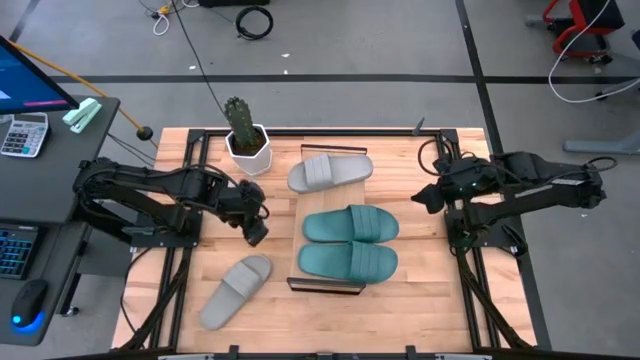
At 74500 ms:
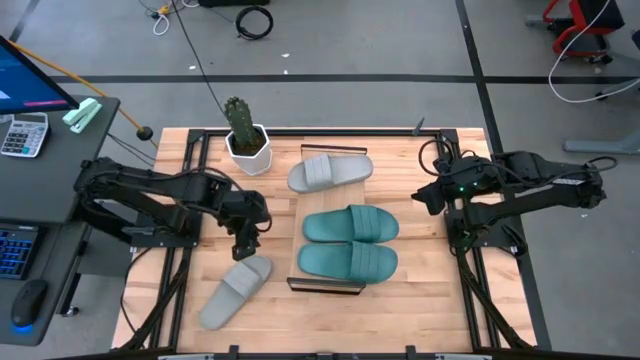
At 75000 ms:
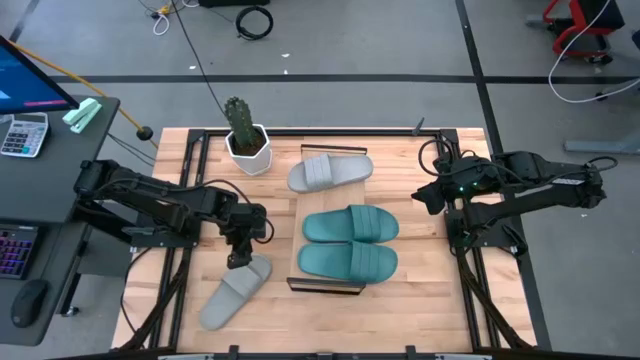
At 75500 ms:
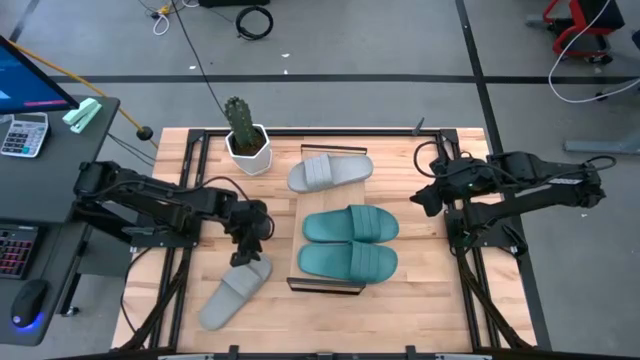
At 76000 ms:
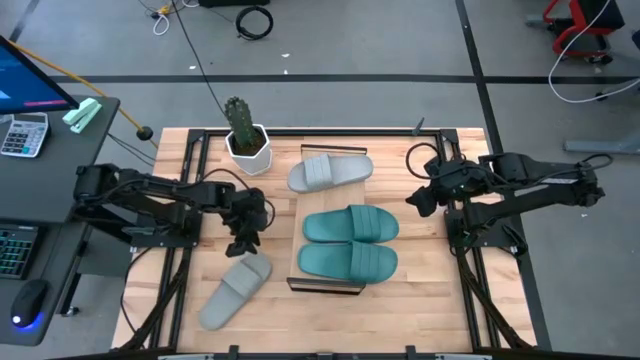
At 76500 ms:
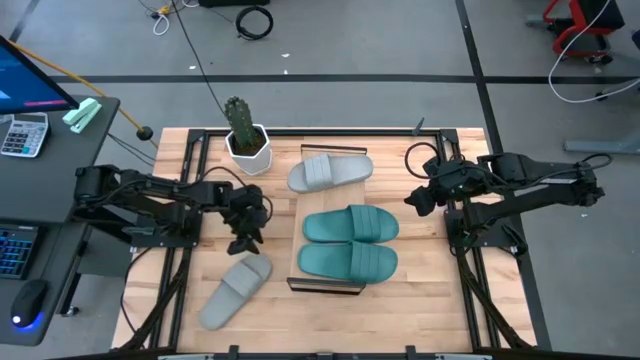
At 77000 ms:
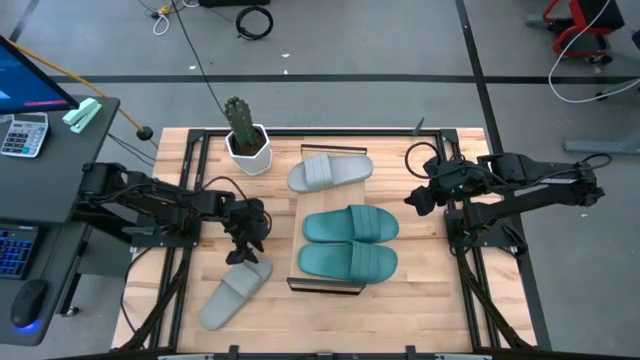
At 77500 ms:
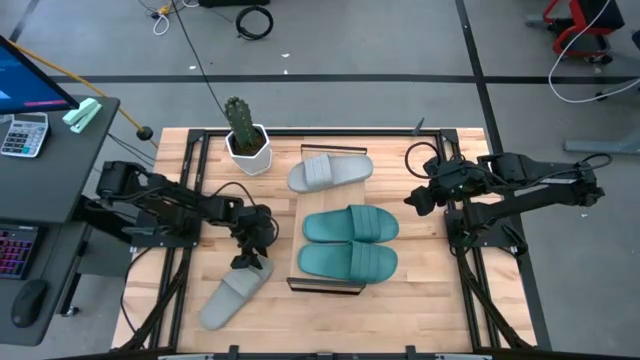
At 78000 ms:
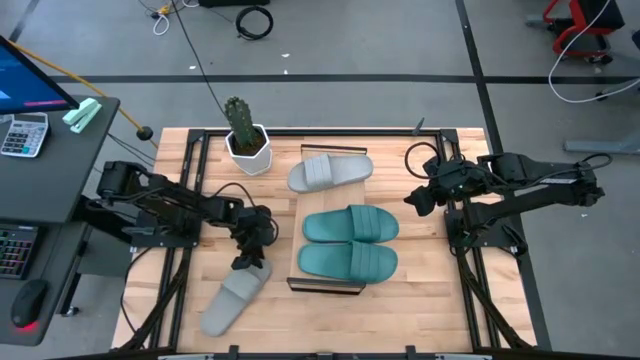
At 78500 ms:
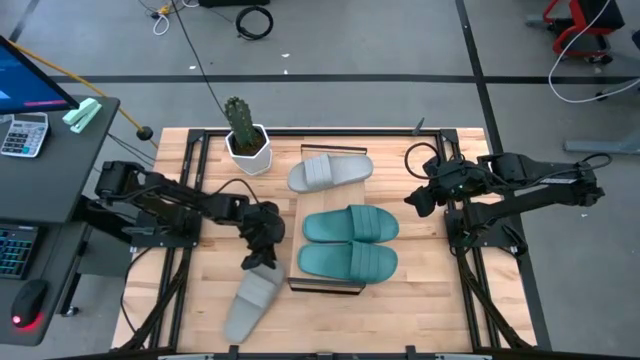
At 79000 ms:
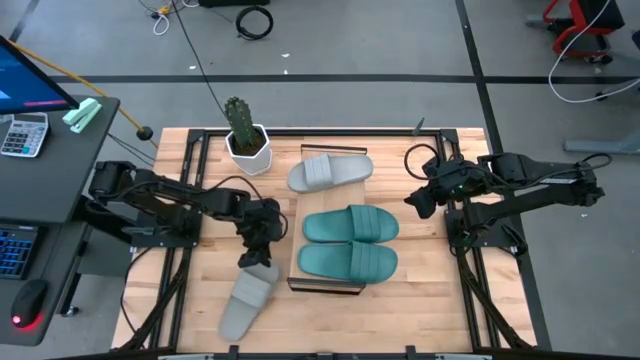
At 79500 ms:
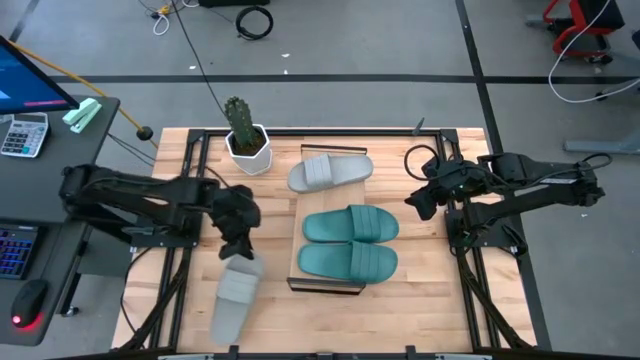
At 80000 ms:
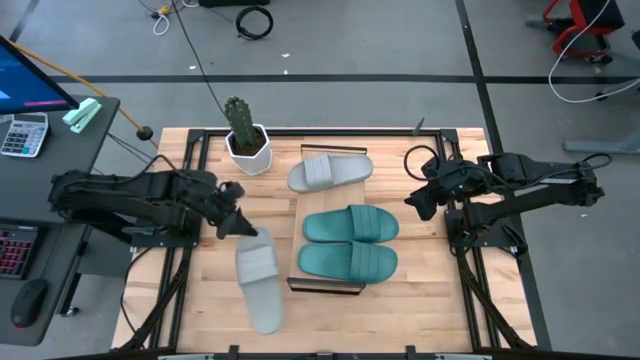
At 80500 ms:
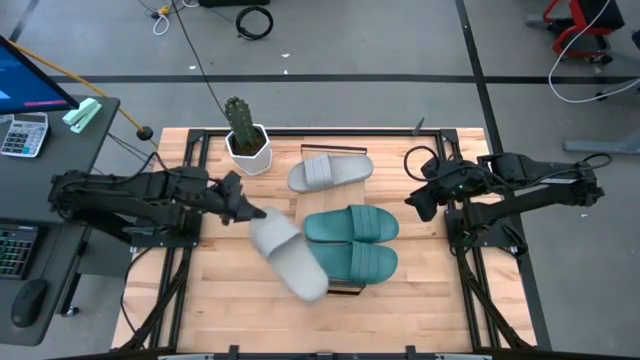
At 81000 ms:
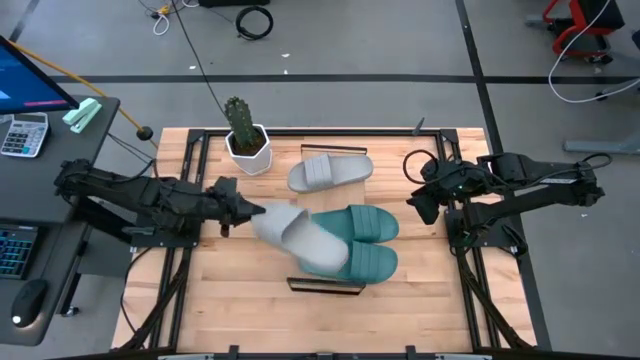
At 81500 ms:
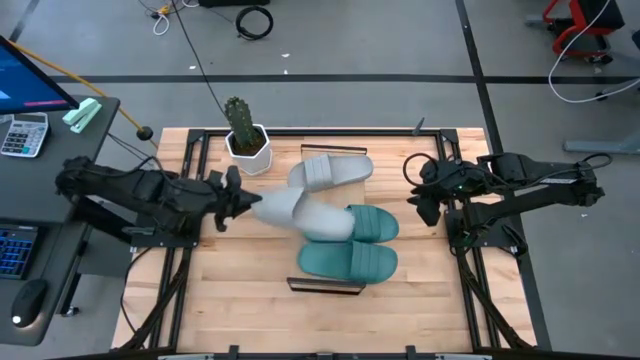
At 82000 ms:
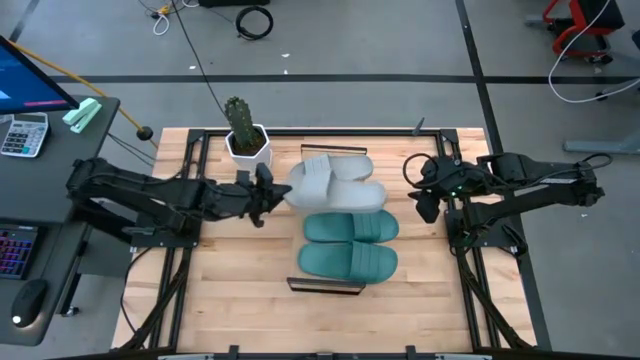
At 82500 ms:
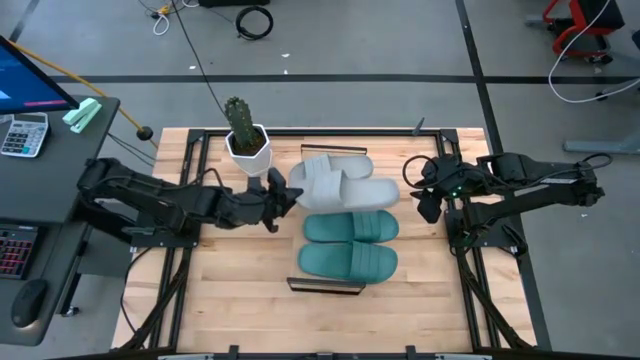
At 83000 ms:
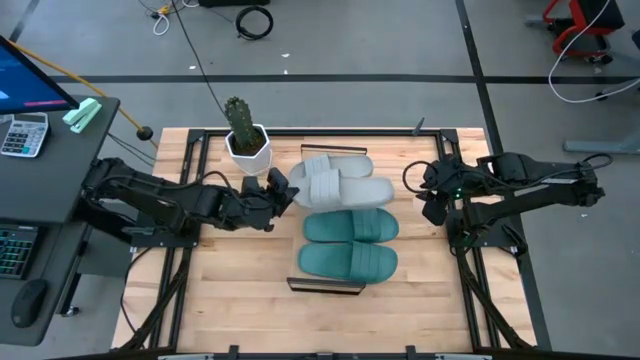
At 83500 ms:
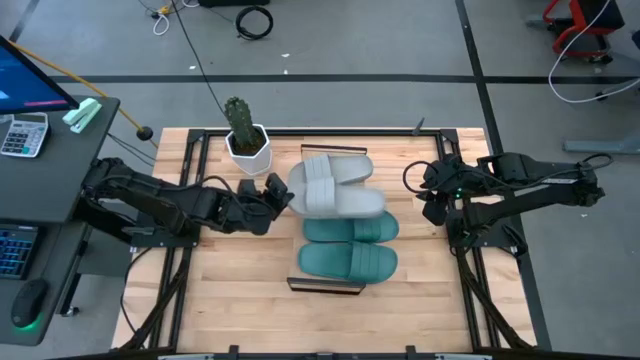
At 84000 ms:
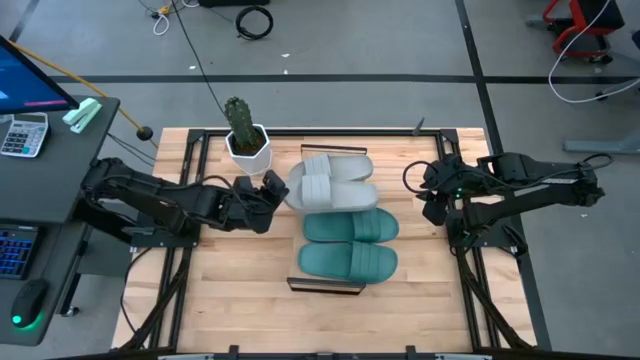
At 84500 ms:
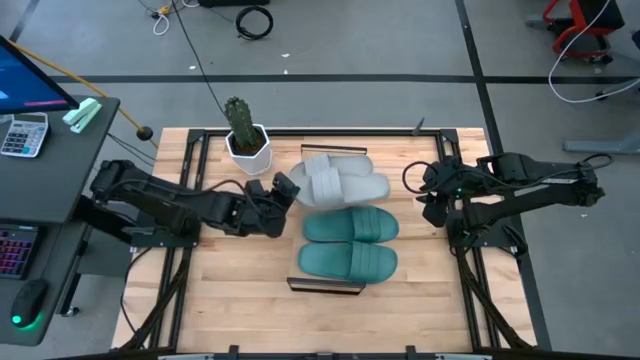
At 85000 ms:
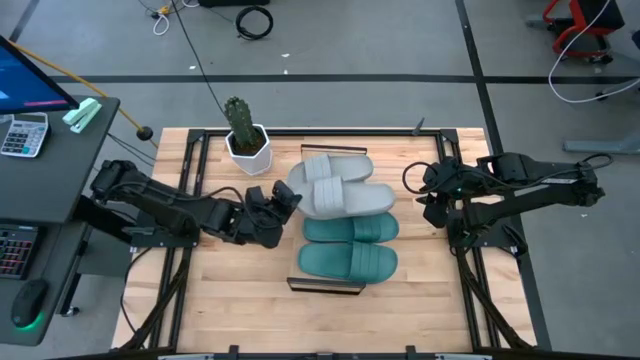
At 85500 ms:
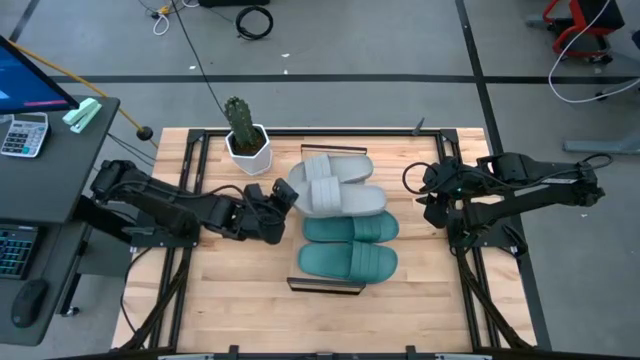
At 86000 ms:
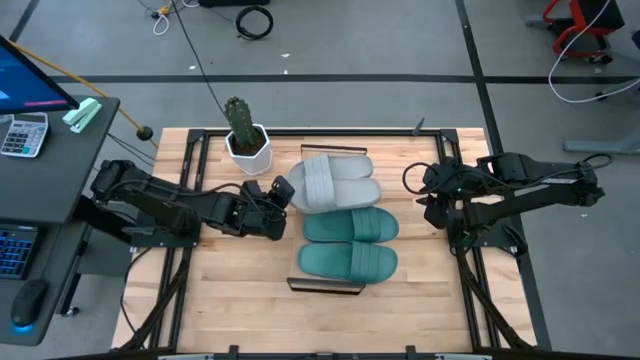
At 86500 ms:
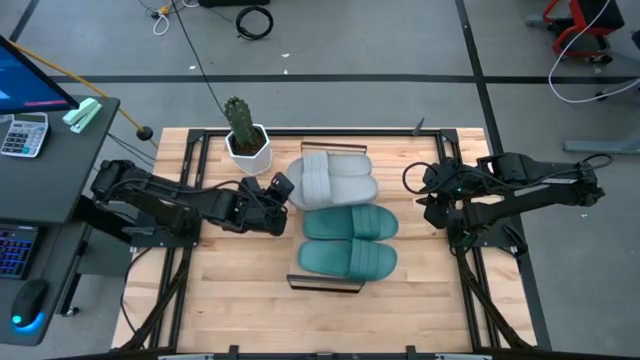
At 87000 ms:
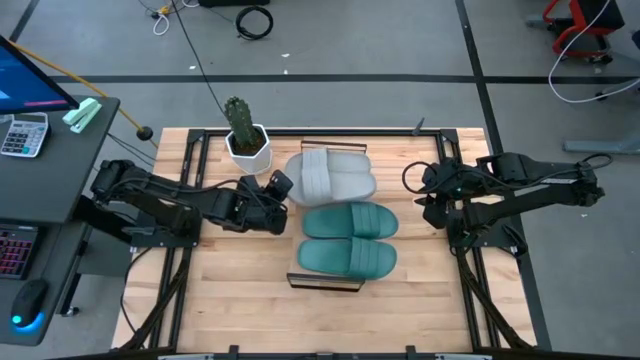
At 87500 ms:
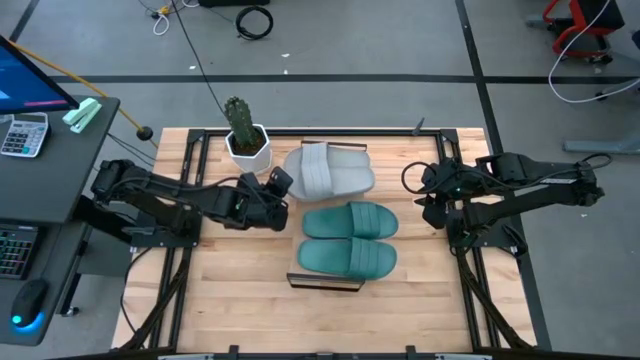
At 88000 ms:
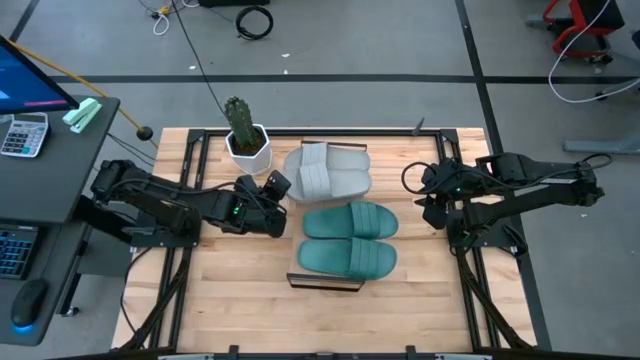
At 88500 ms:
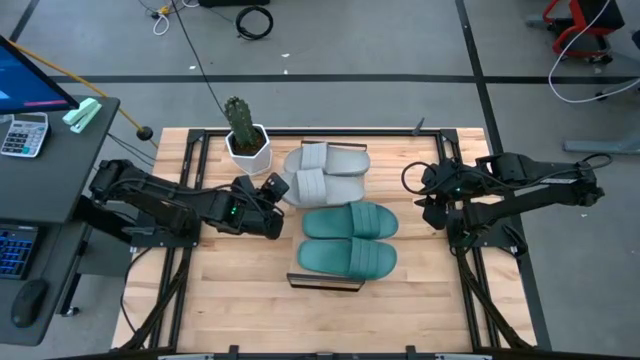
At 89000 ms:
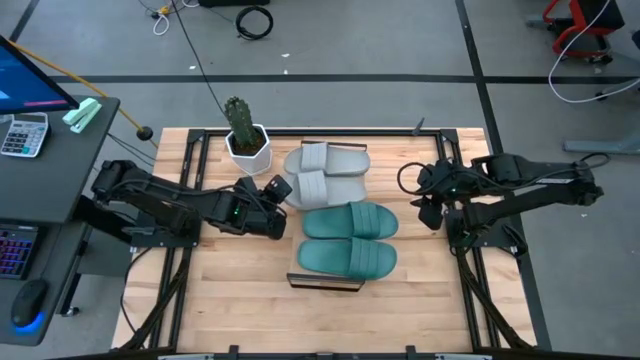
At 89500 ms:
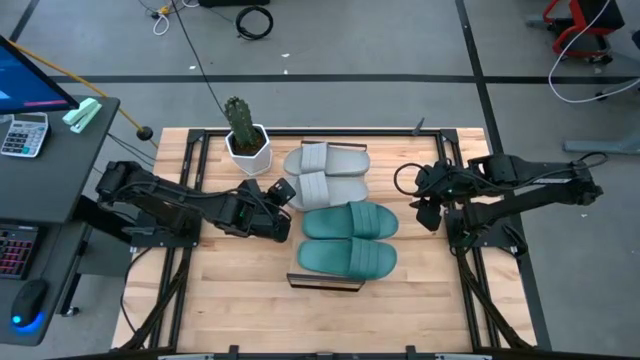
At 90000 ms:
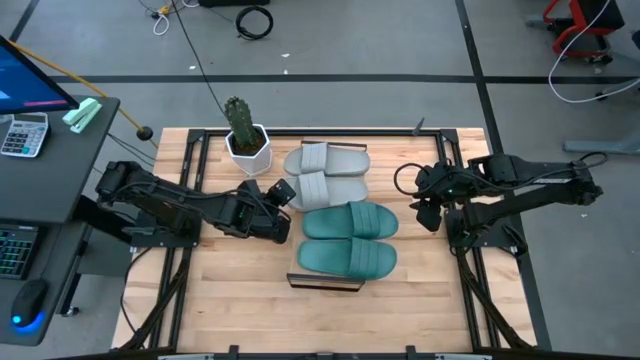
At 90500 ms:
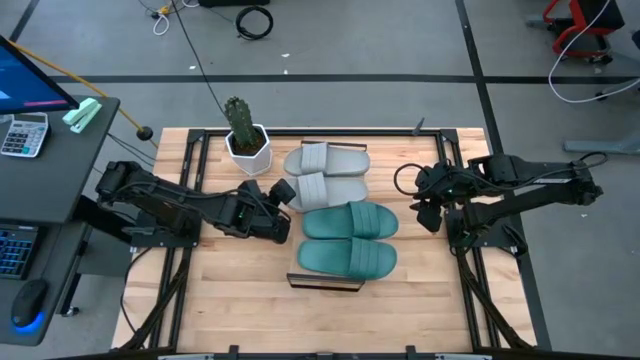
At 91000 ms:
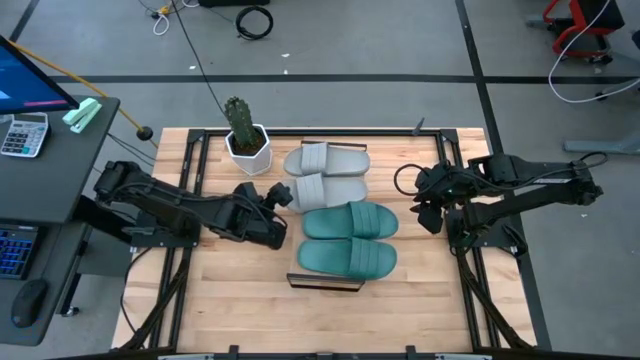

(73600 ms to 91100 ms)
Task: Pick and place slides into the shelf
Put the gray slipper on the shelf

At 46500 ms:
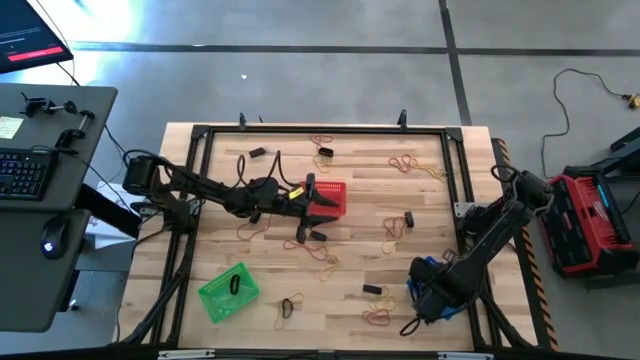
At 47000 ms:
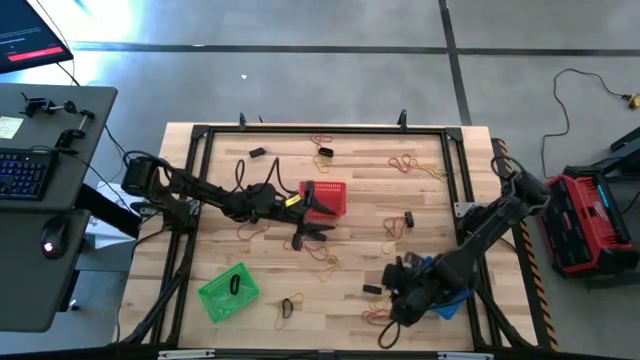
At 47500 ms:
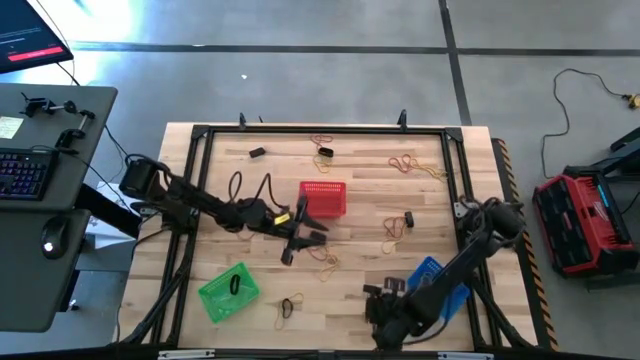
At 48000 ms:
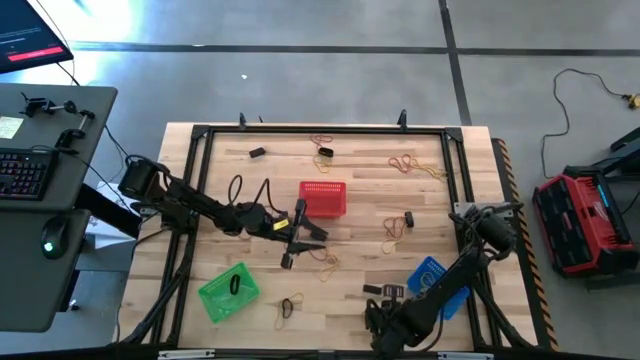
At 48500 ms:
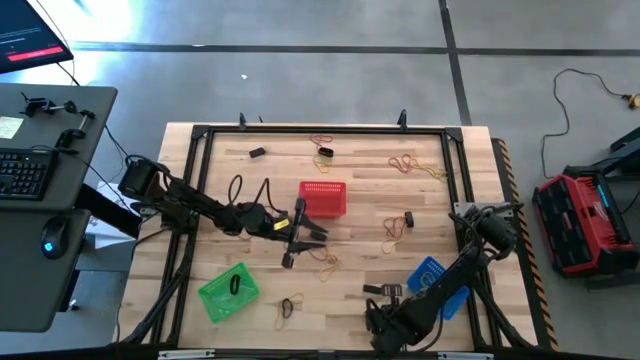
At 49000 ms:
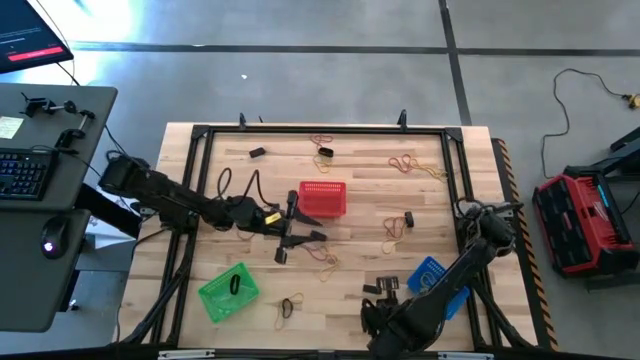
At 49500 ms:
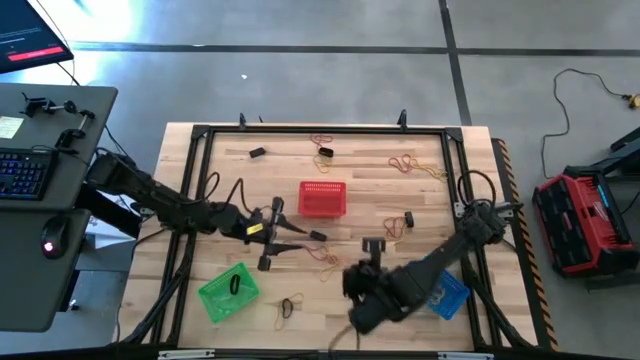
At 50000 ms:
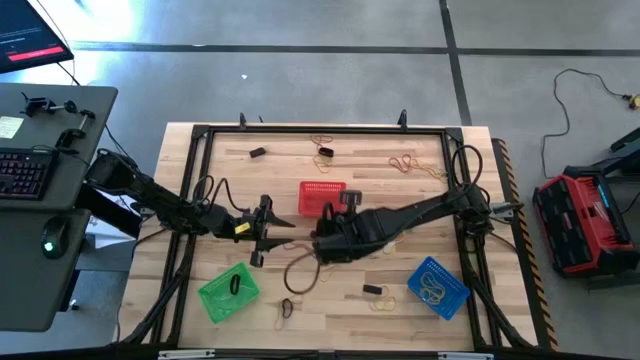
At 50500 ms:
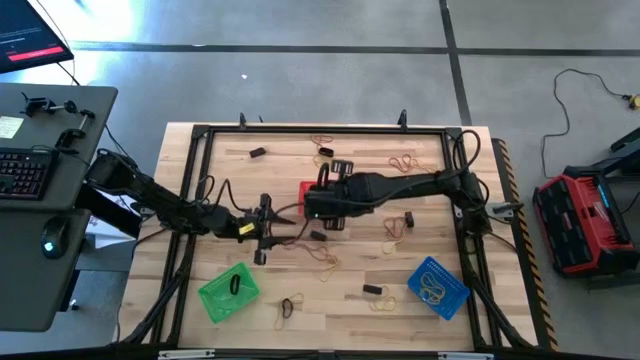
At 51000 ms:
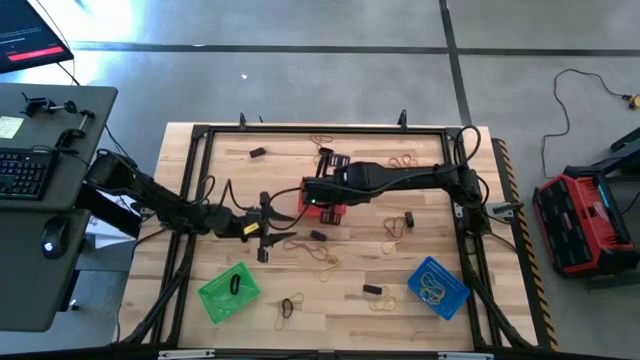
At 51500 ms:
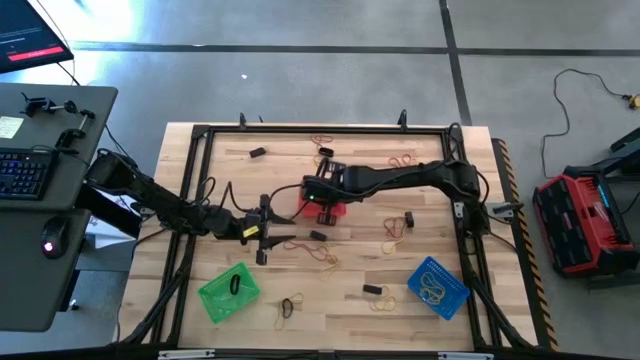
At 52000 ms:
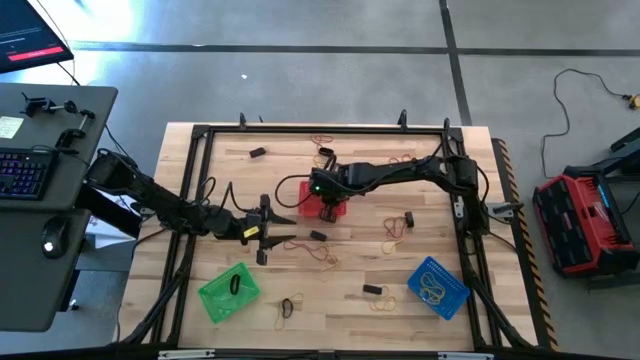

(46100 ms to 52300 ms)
Task: Sort rubber bands into baskets
Put the red rubber band into the red bin
